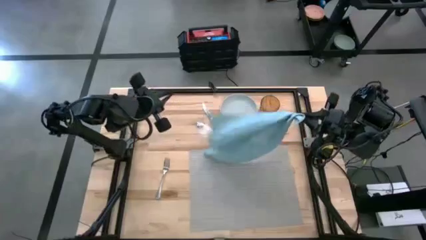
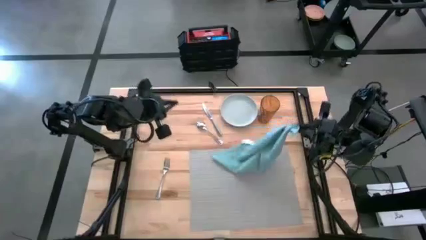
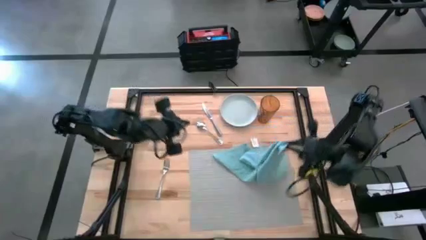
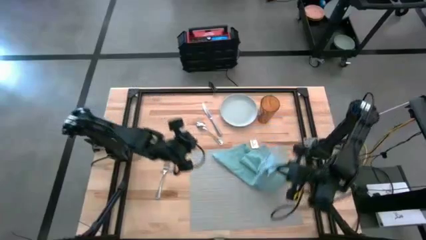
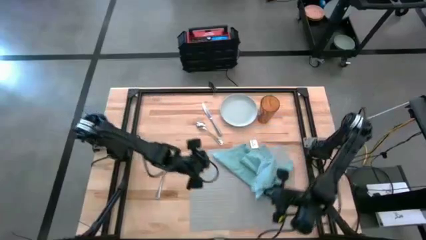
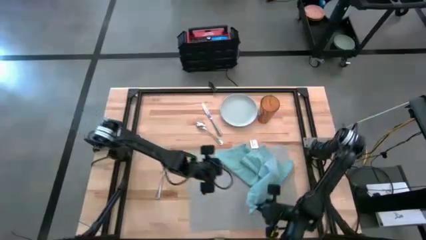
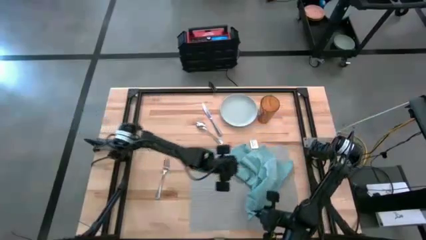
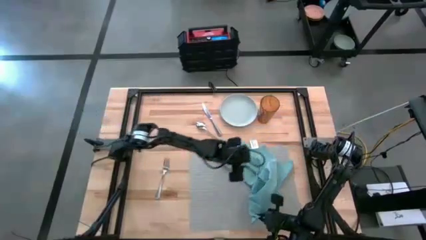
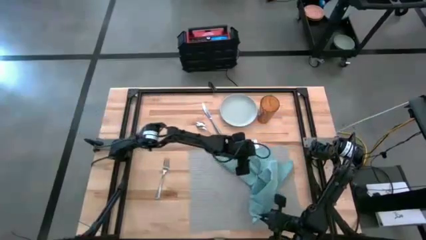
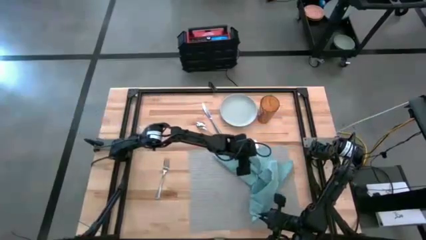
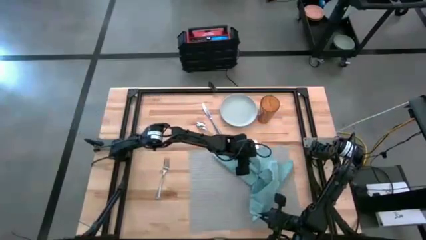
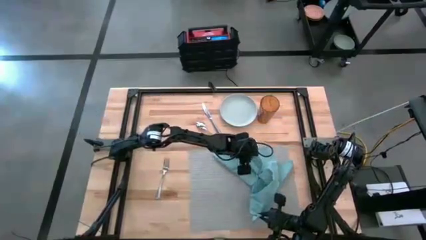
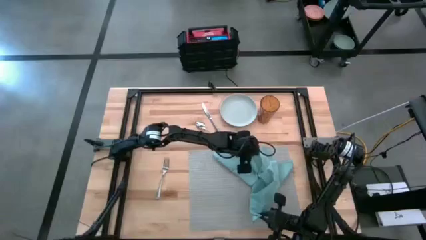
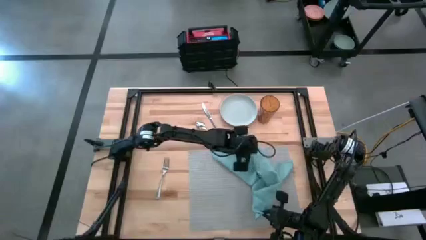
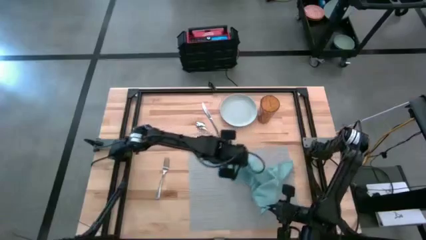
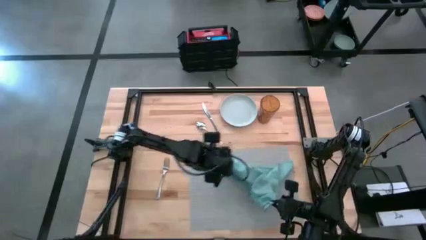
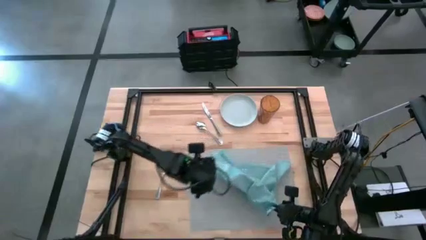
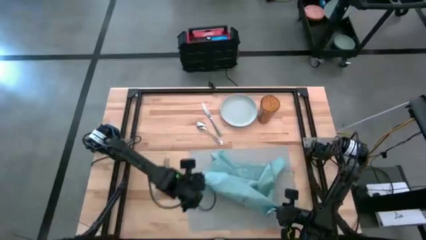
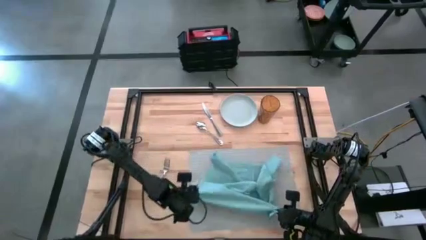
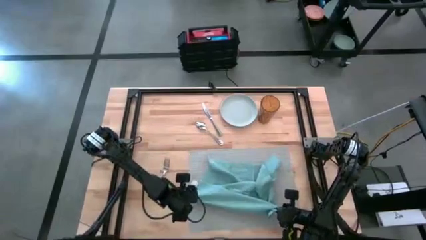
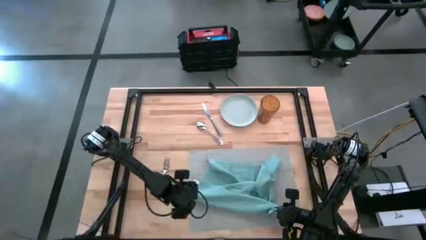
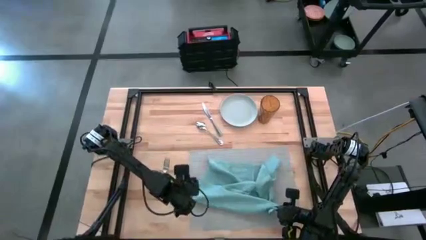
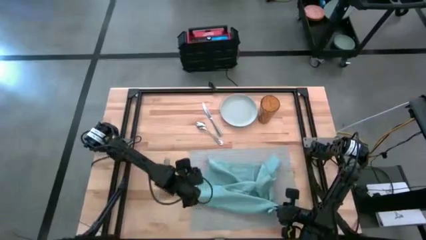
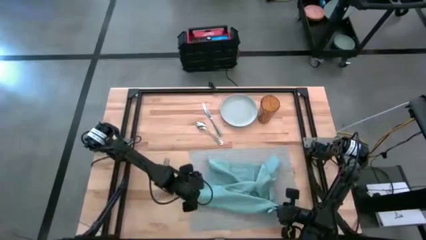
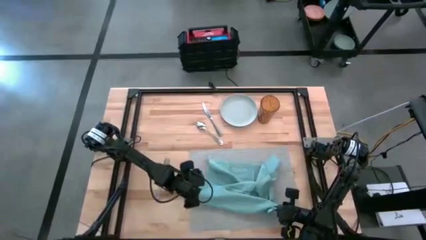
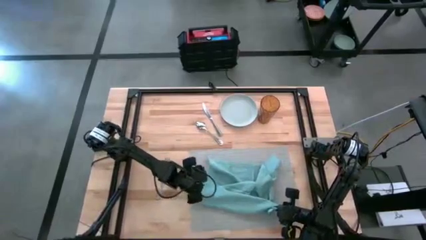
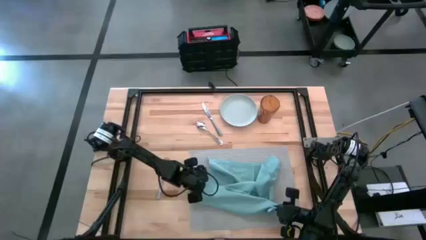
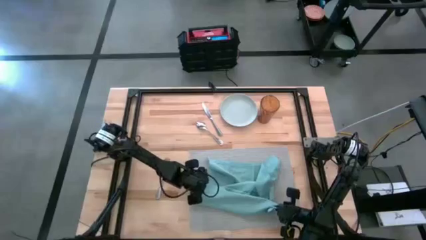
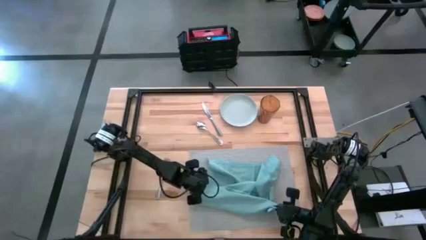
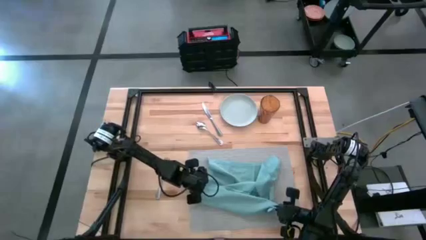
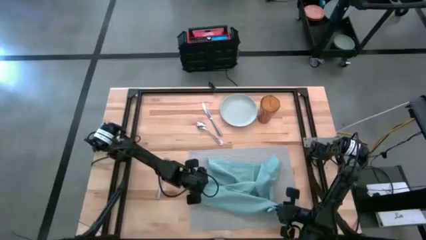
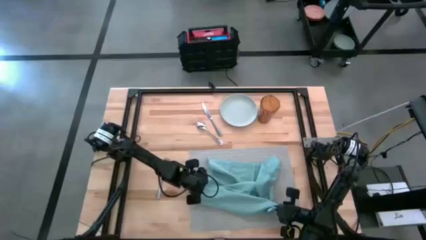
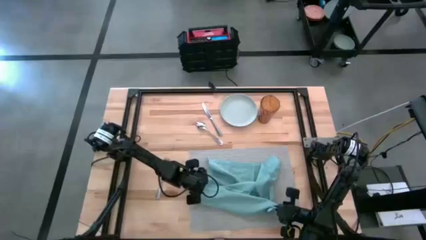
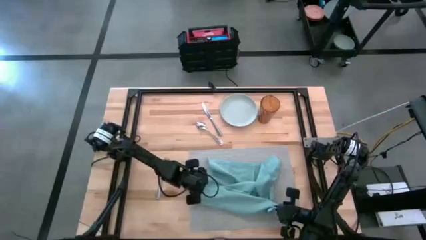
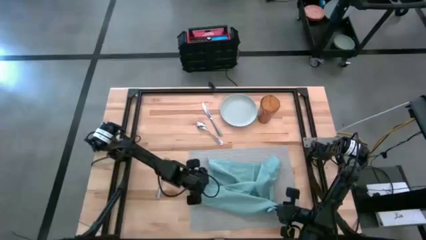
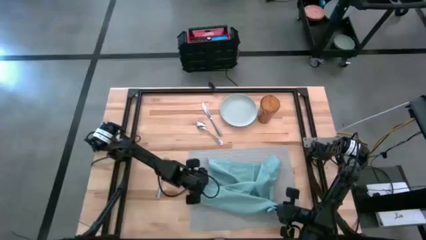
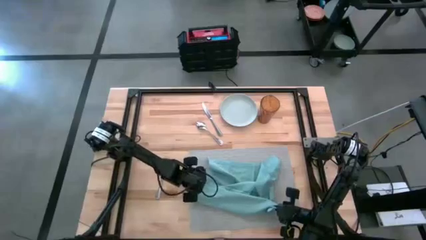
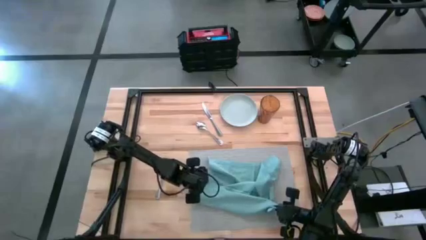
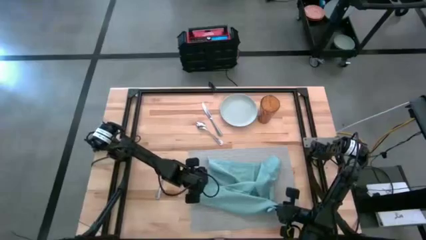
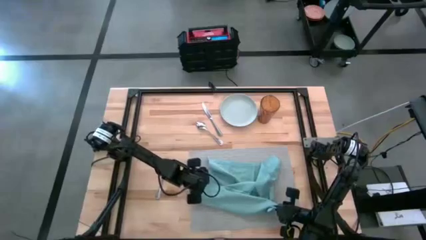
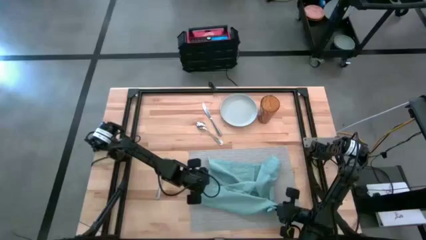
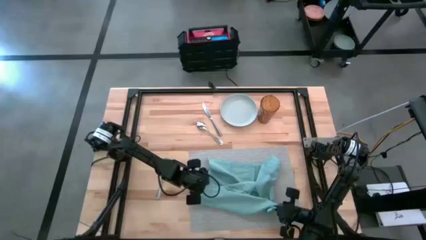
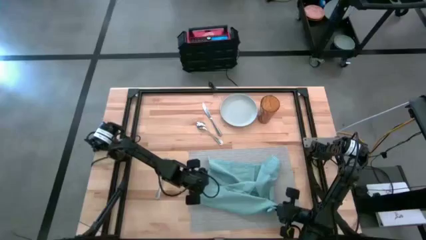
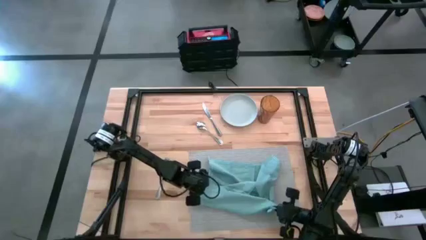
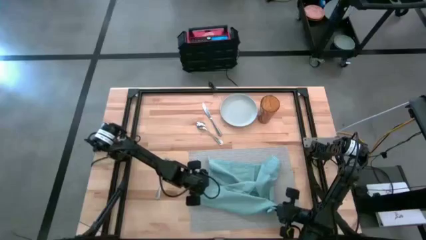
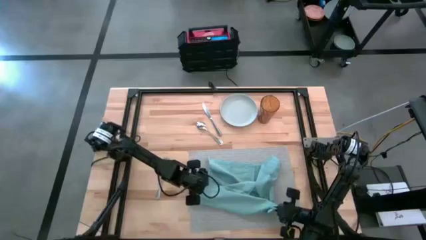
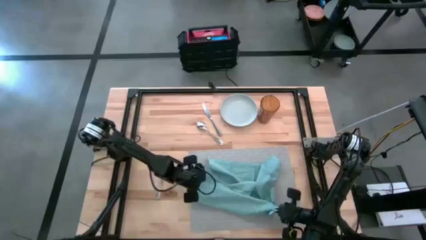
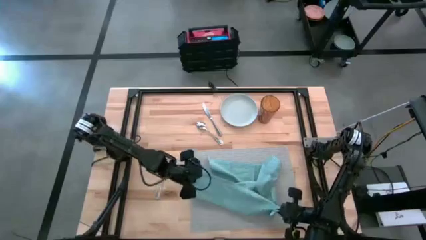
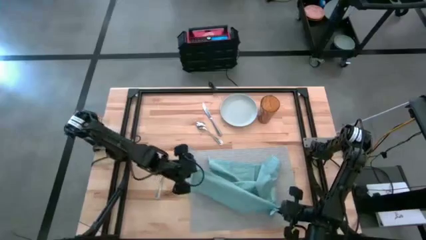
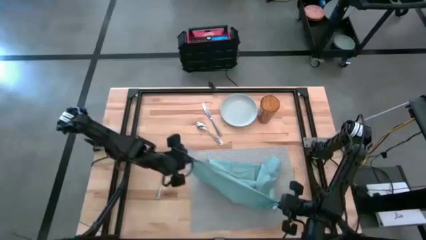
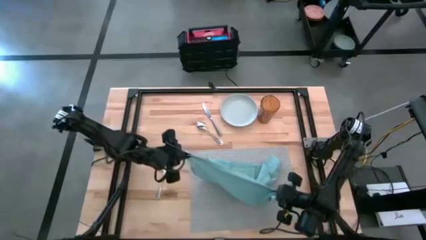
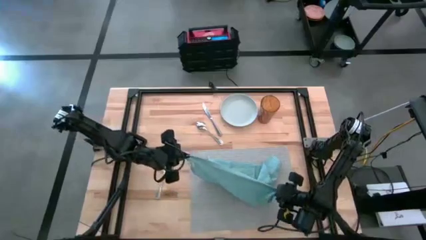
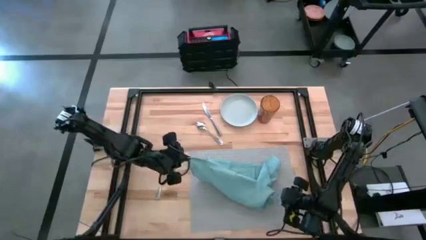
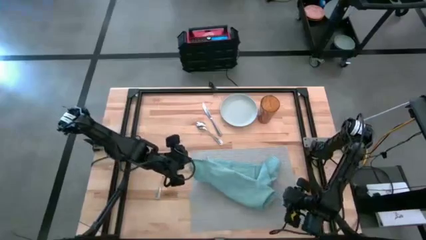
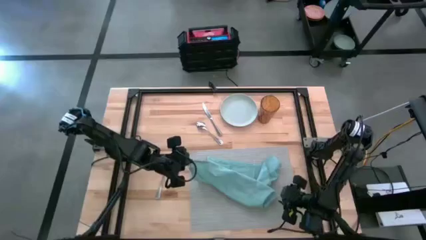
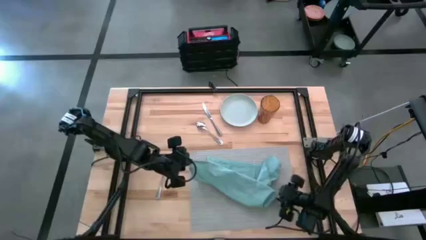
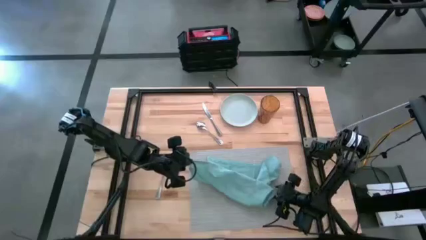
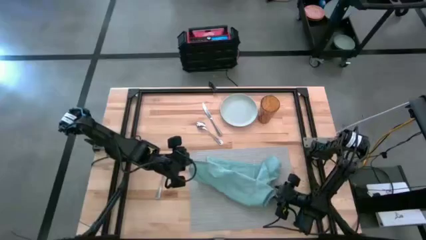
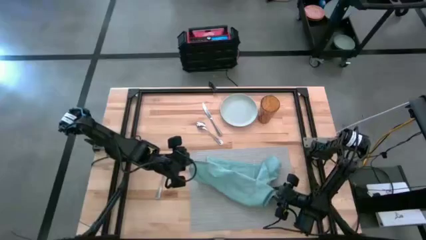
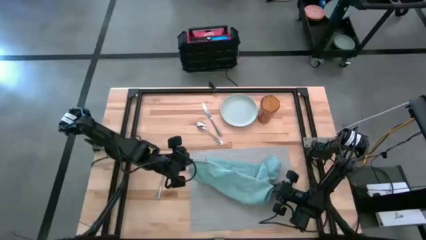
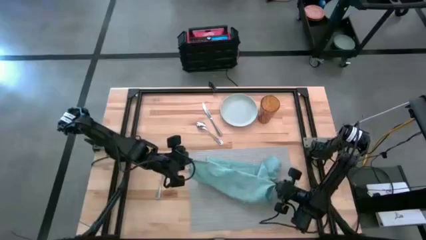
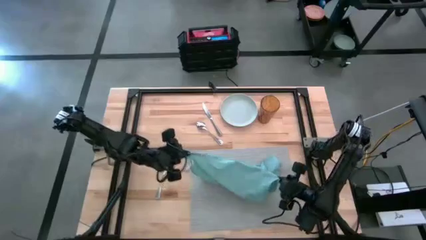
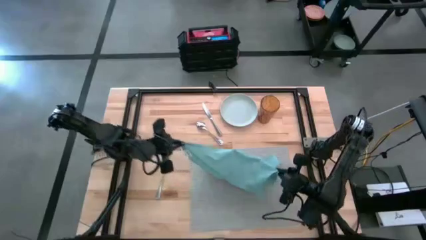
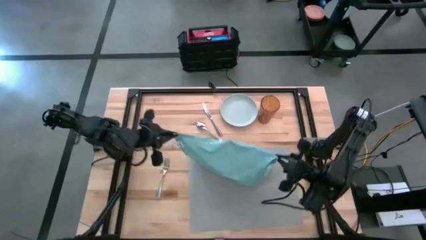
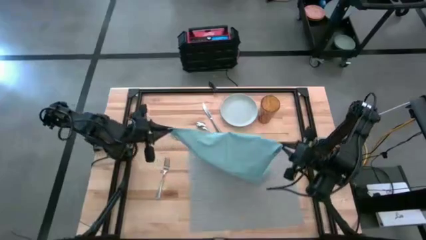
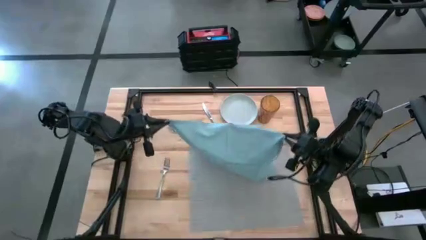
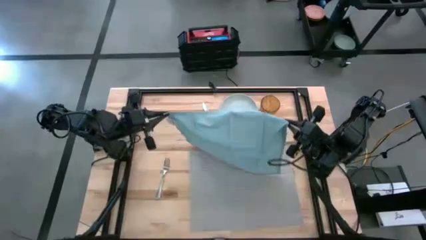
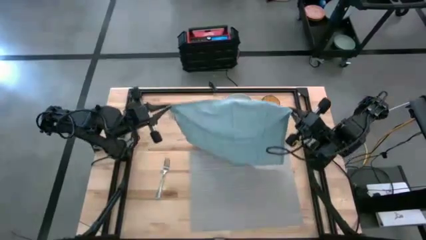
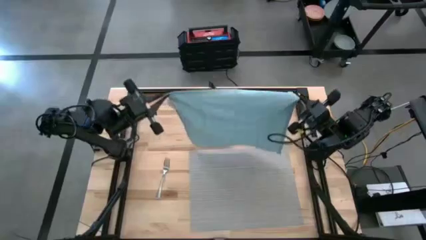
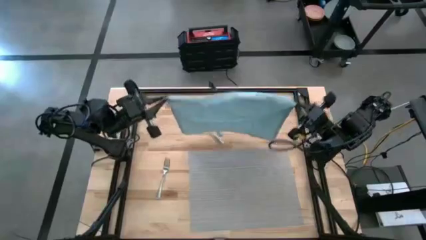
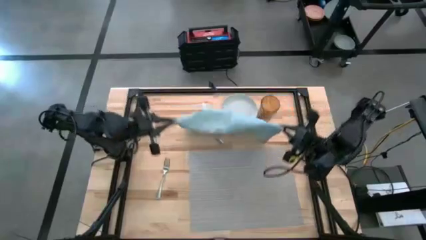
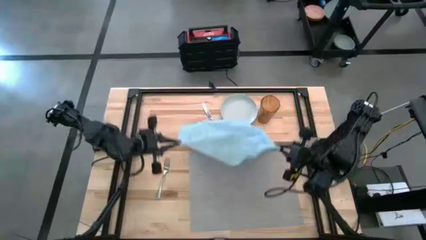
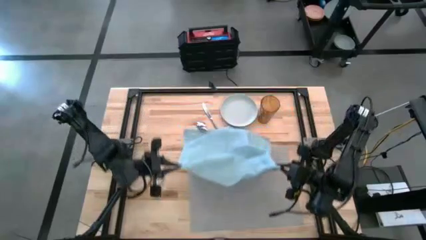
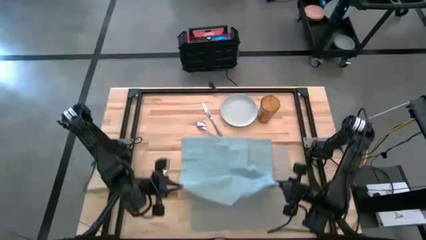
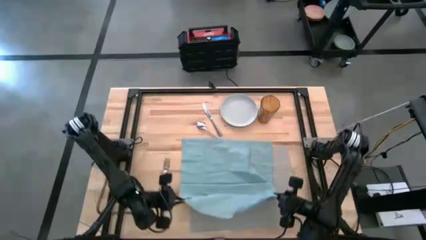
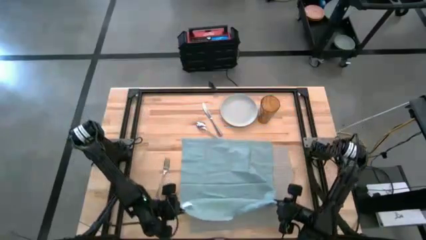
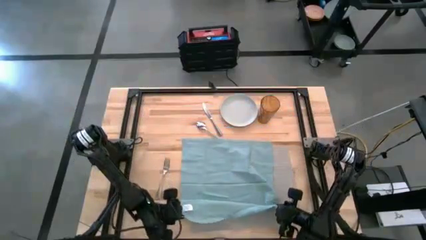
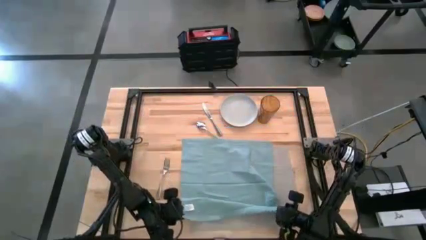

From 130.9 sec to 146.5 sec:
Task: Set table place
Fold the blue napkin on the gray placemat
